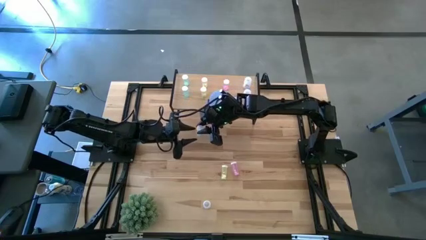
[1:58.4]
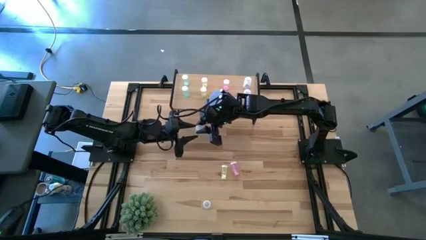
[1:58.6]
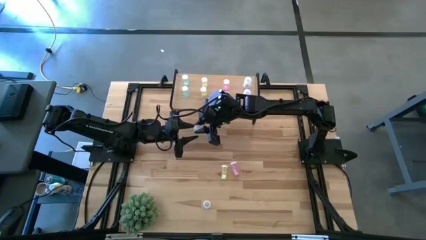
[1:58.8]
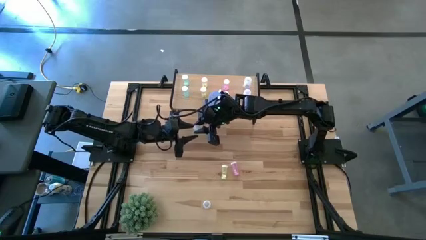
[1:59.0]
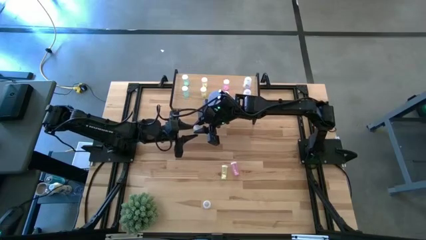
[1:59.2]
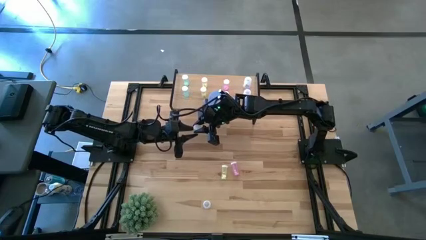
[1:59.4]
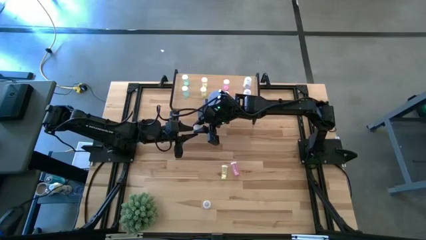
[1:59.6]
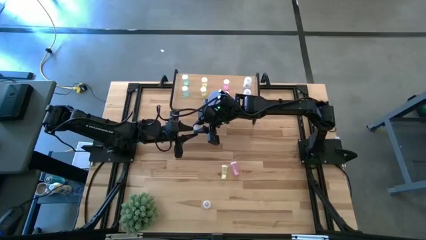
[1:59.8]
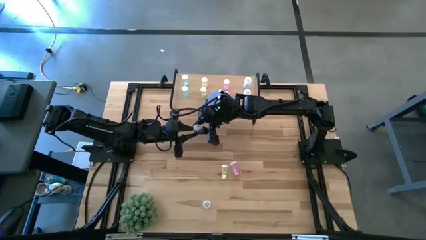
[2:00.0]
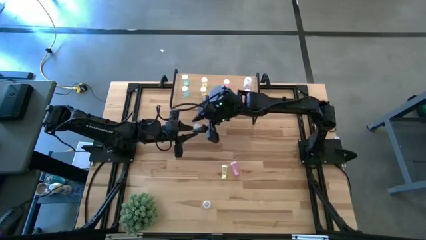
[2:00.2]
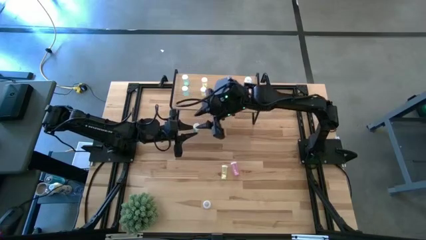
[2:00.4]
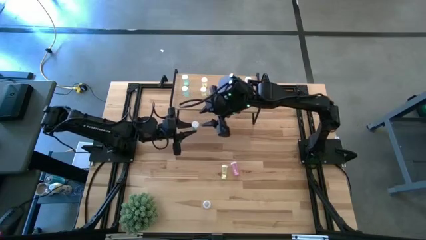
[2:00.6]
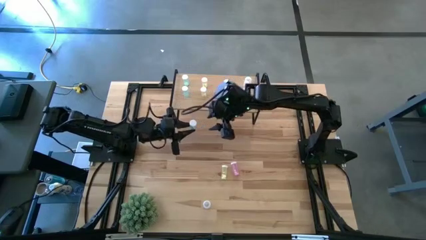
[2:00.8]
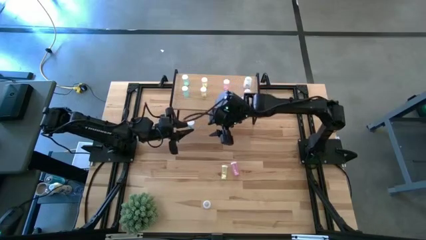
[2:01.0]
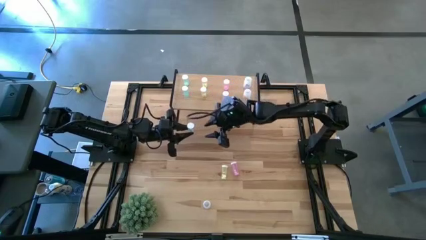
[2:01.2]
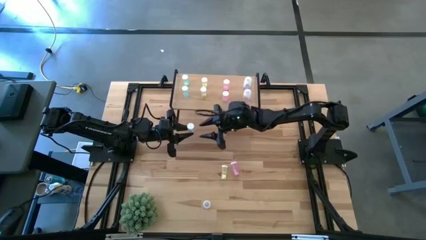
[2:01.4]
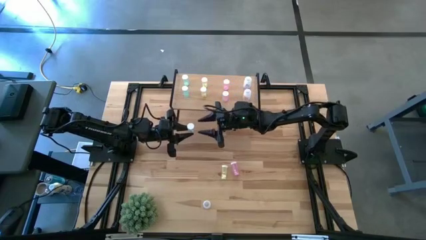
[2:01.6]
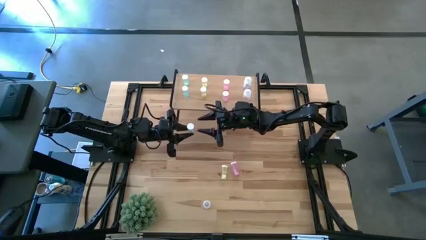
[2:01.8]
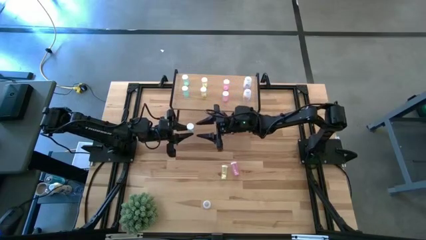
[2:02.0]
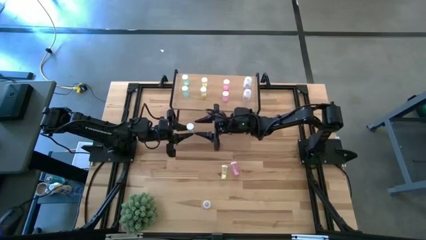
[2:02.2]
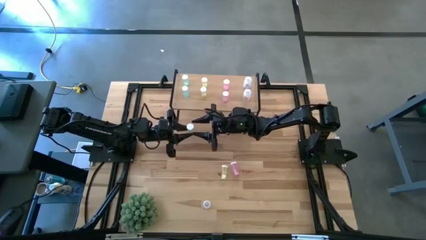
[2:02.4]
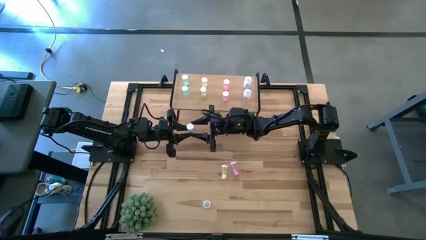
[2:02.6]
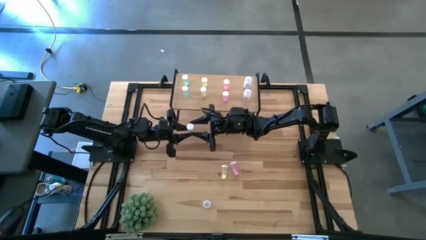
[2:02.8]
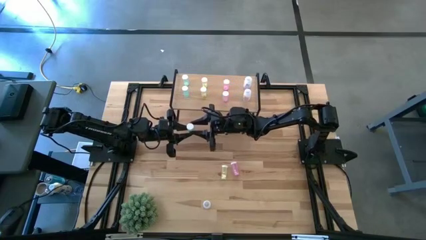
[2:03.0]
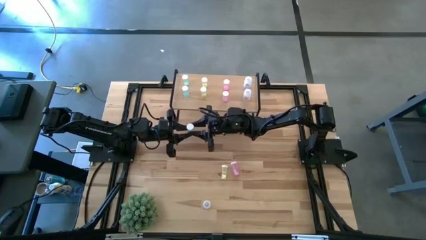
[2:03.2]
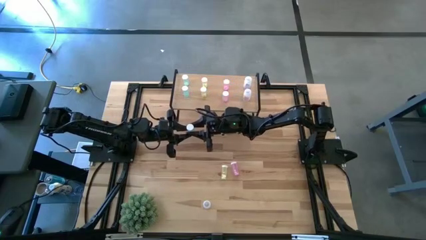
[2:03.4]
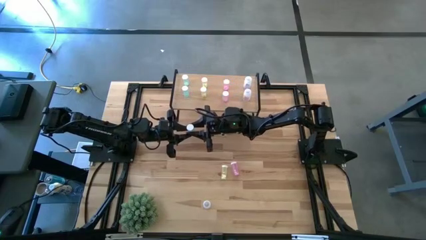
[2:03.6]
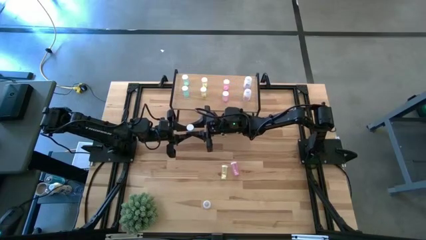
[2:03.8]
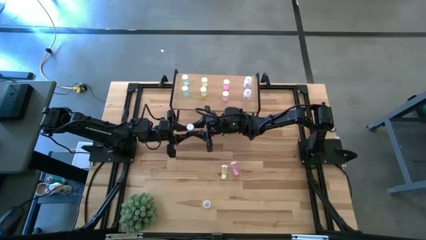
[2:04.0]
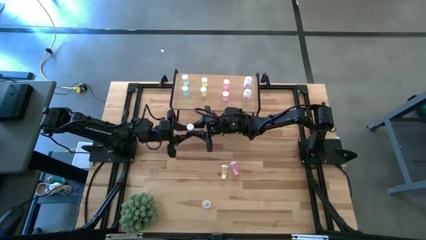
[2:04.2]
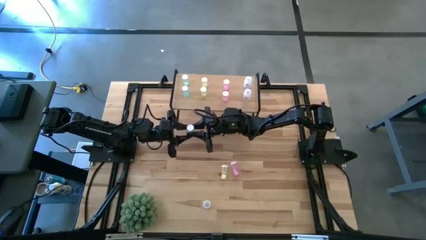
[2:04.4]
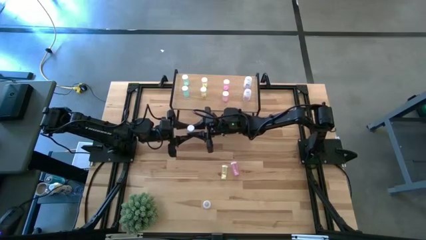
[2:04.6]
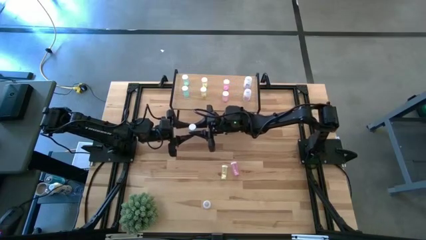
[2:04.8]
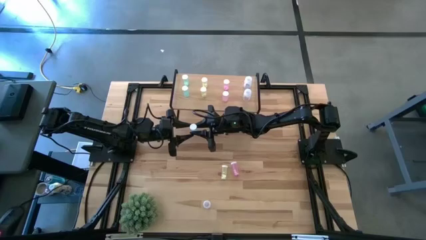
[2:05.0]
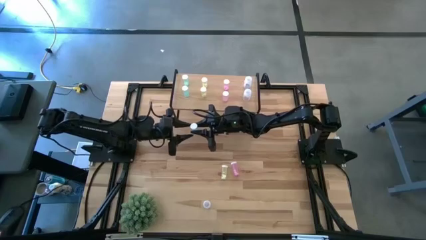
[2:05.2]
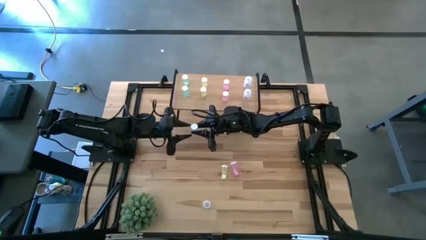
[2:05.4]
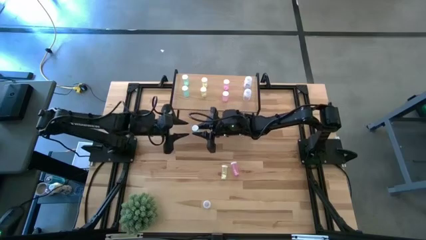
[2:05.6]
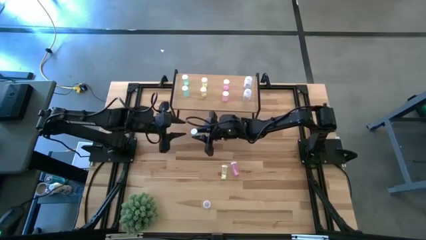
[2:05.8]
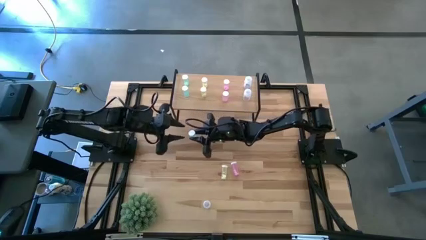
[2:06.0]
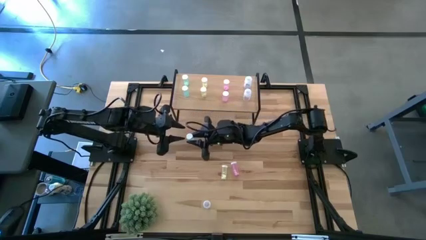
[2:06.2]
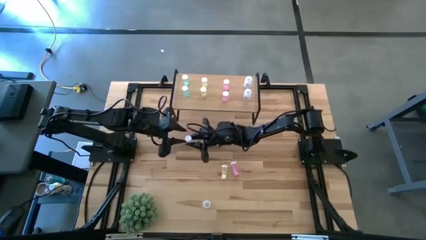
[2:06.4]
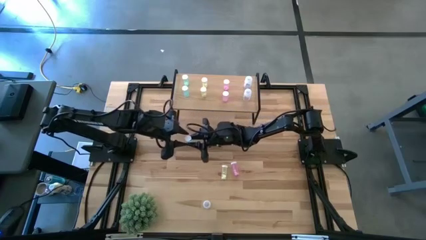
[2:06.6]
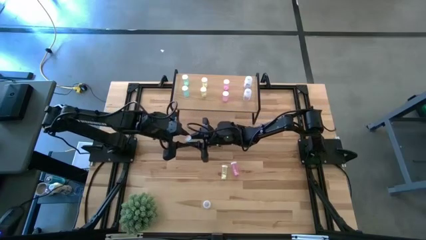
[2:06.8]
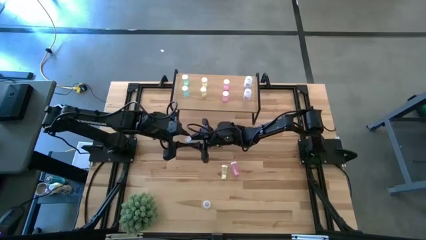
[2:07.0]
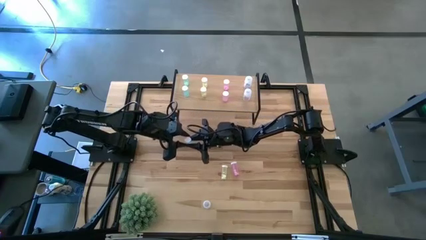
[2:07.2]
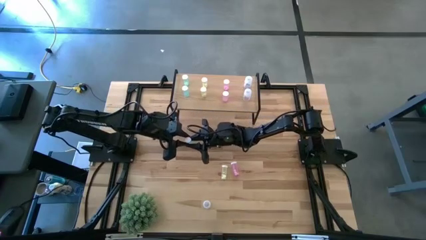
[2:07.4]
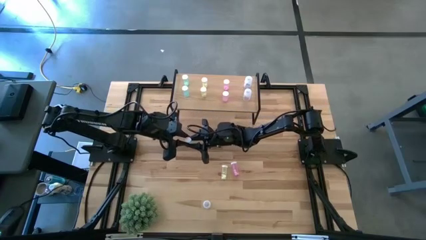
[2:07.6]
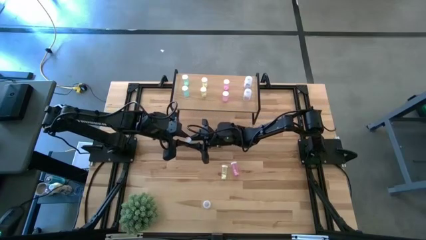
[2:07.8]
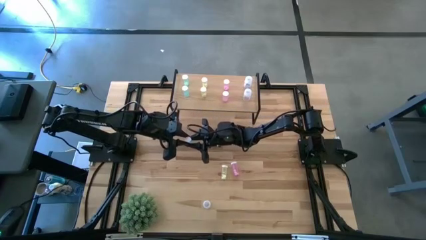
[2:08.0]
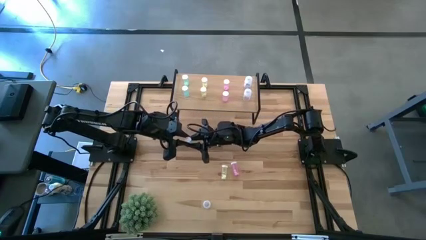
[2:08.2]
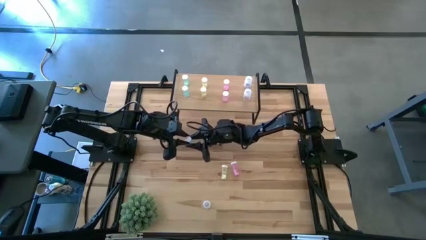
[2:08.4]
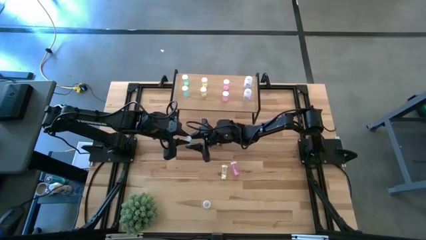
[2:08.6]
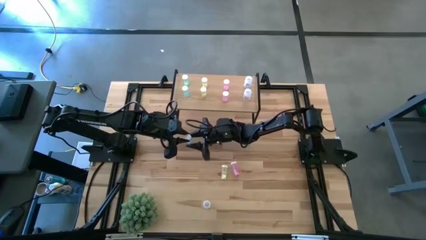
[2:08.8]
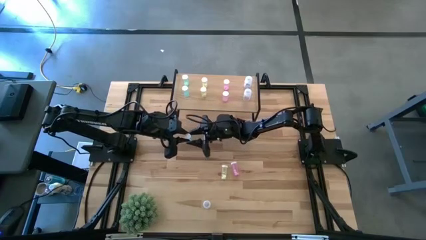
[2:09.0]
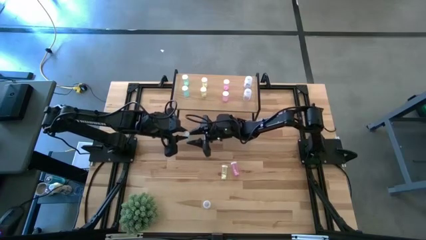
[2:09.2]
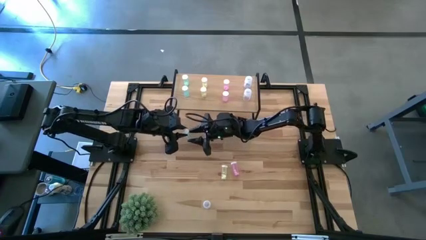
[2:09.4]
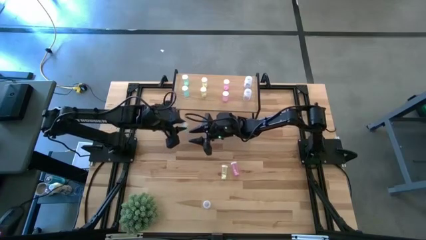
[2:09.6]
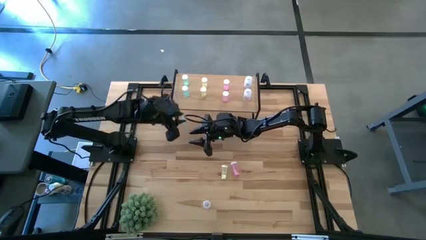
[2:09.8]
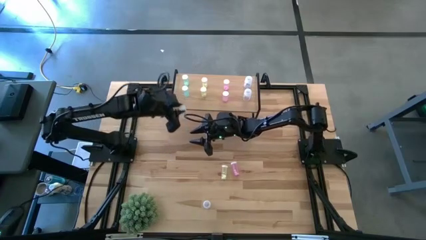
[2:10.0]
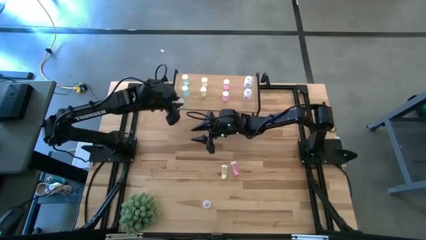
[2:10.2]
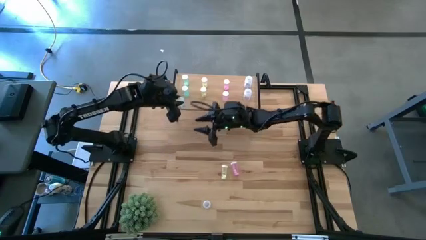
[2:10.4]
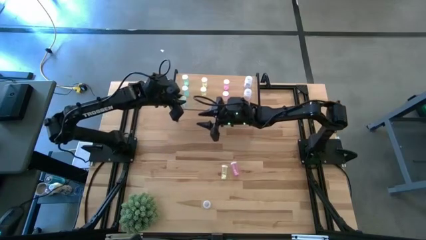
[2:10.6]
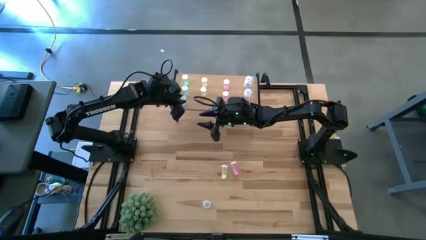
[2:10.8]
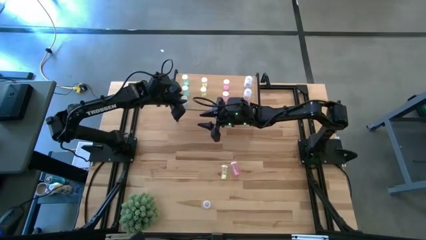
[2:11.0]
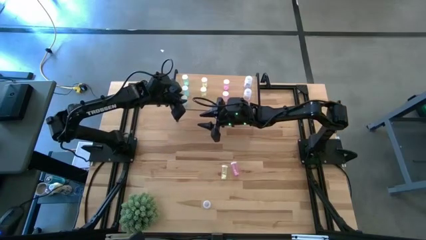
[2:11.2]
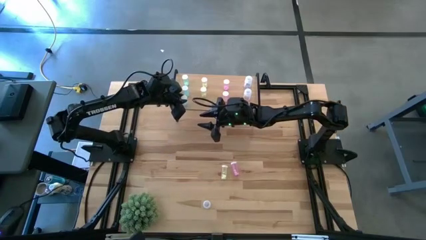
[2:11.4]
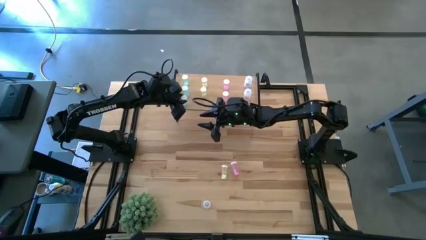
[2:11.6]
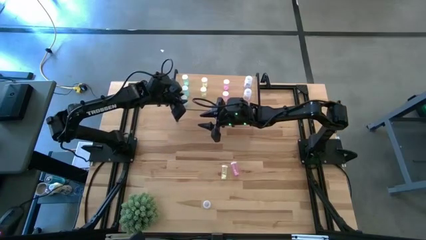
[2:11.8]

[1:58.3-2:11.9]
Task: Pick and place medicine bottles onto shelf by color
Put the blue pill bottle on the shelf aligned with the other blue pill bottles

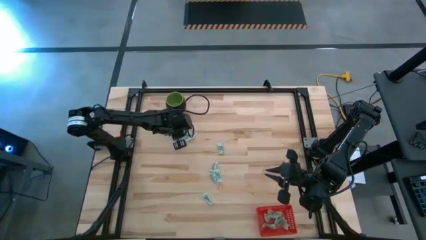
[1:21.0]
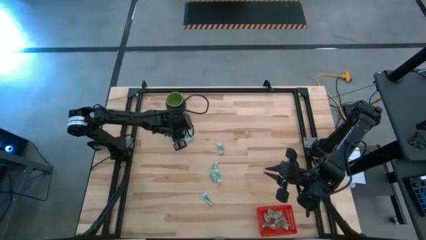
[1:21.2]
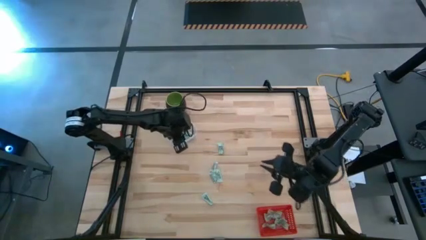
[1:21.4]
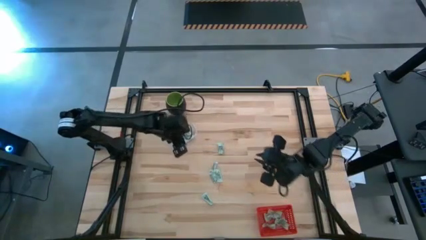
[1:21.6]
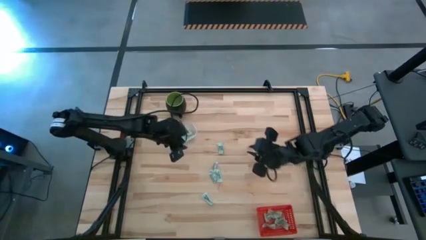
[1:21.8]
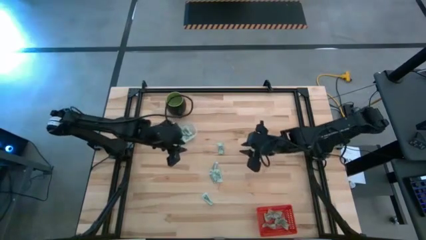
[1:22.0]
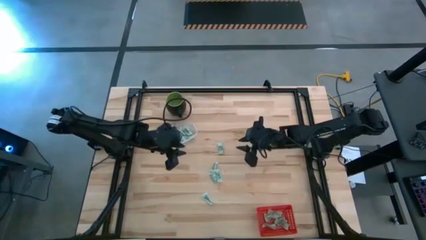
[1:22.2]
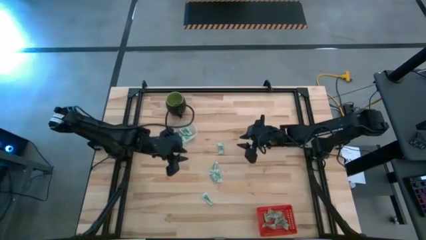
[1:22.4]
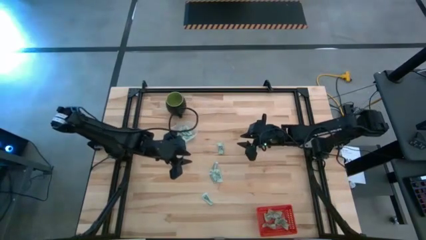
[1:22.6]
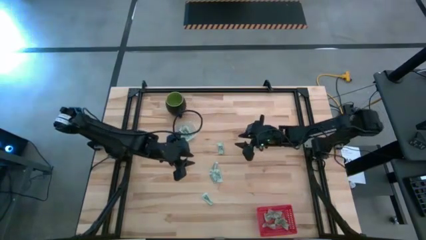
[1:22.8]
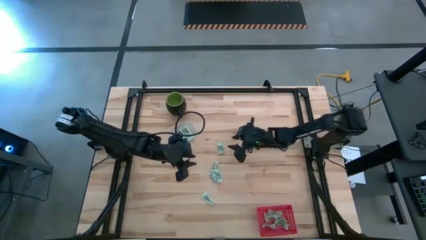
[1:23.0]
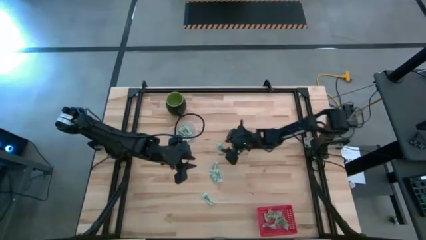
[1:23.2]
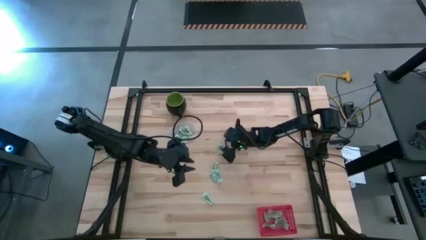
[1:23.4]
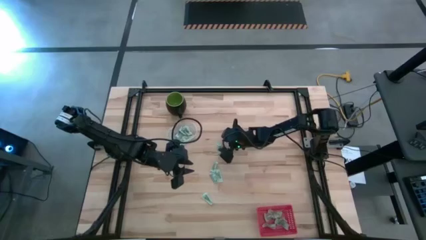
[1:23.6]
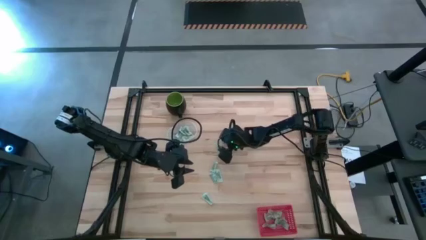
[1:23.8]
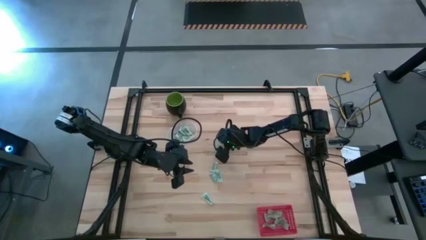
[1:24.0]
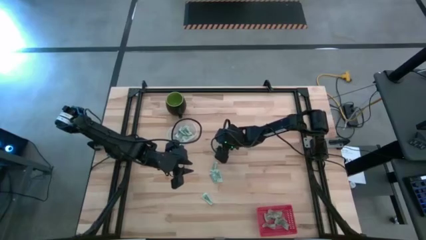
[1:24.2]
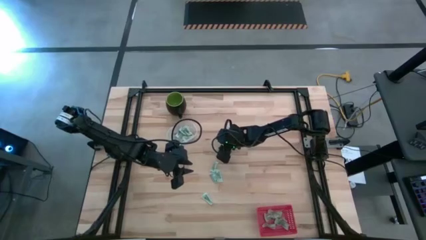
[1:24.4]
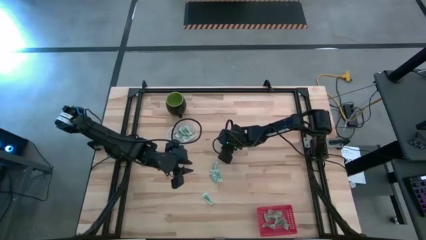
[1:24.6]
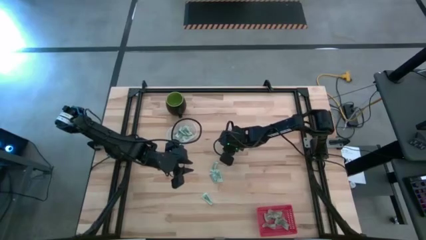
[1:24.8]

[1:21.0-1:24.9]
Task: Pick and place items into bin
Put the green stevia packet into the red basket
